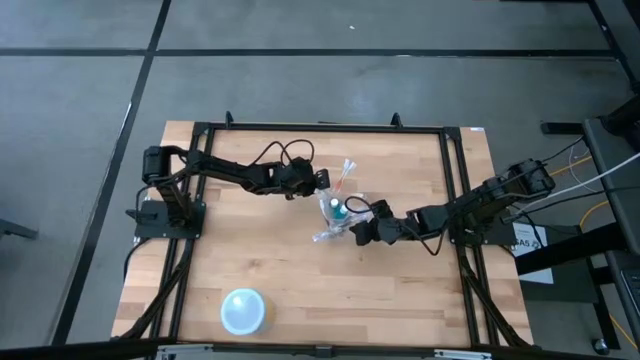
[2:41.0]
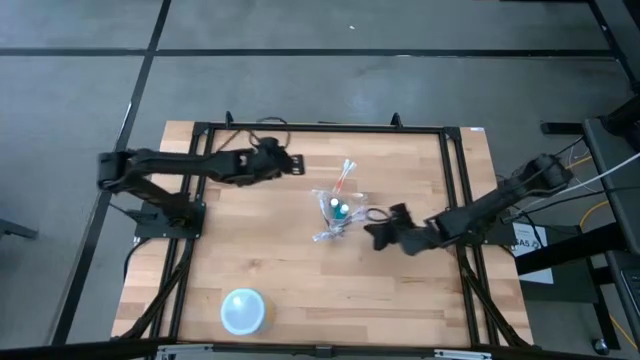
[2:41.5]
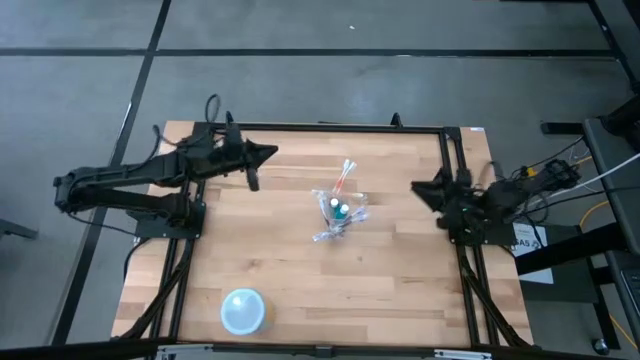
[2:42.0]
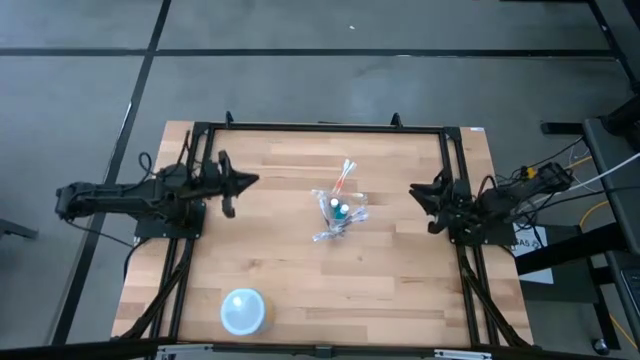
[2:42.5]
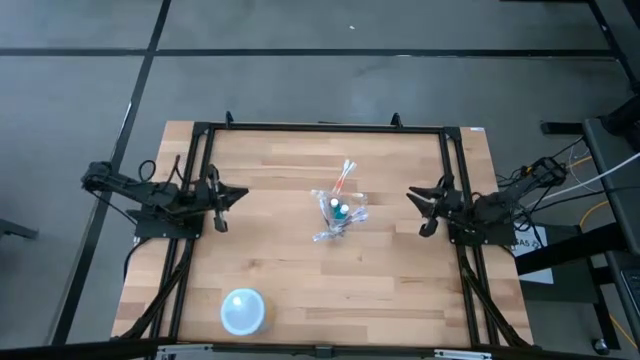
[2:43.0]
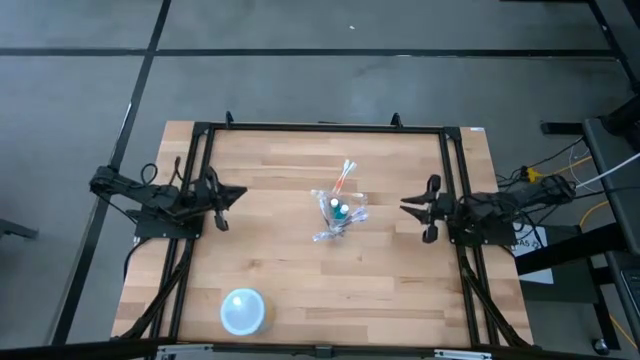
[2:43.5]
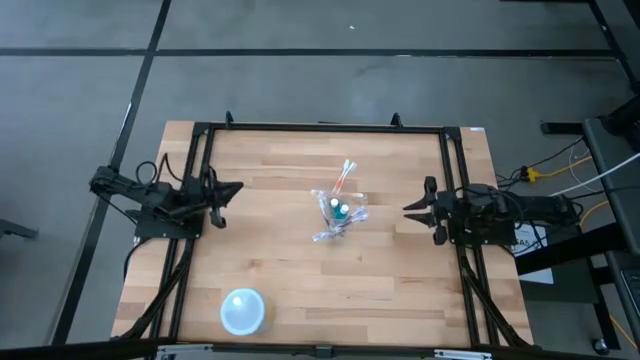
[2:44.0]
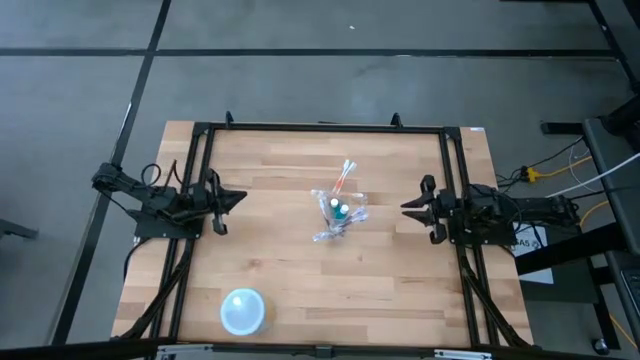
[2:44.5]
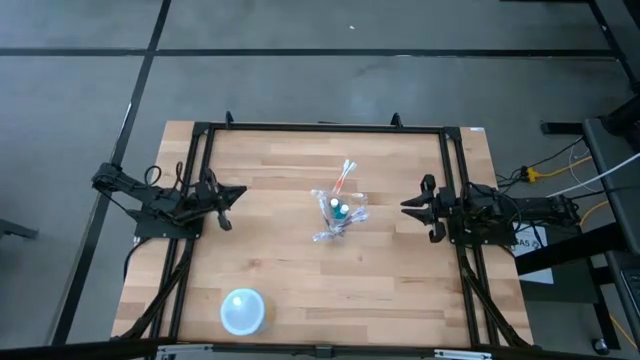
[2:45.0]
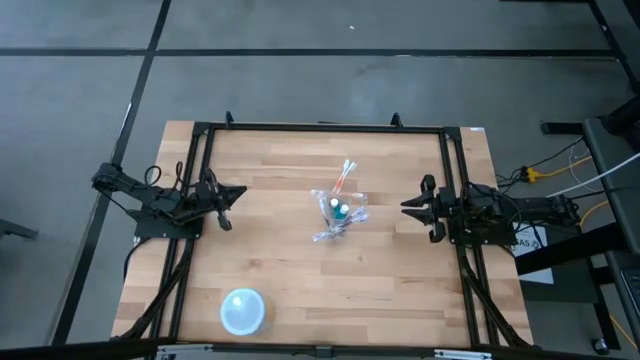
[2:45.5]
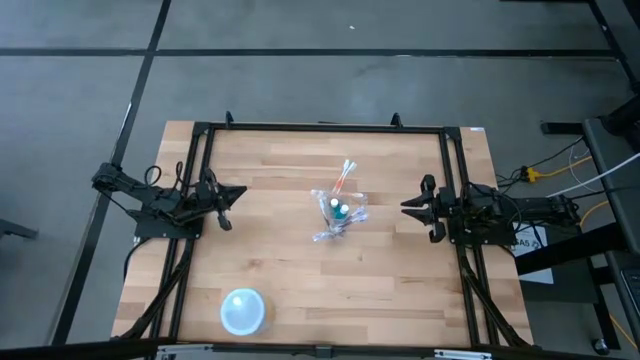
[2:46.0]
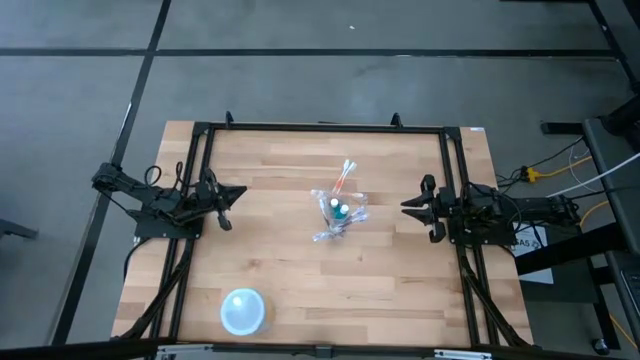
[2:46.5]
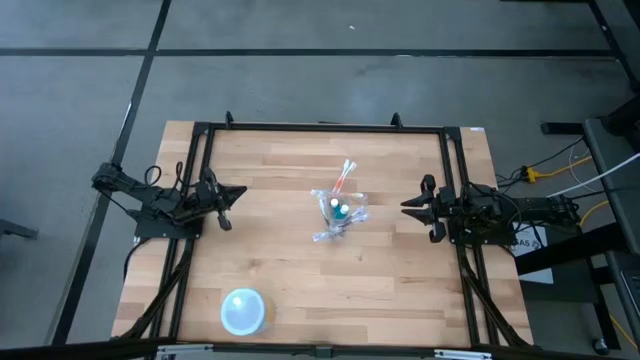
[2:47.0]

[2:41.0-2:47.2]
Task: Pick & Place toothbrushing station
Return to Home Position

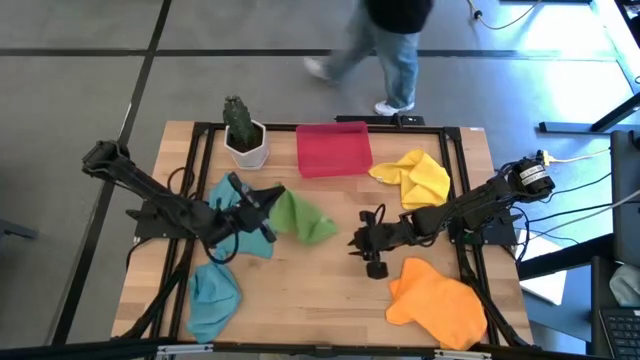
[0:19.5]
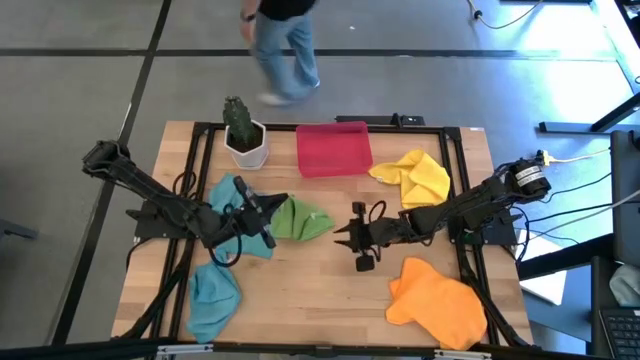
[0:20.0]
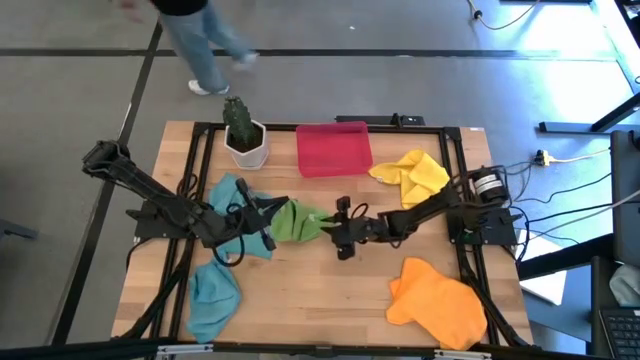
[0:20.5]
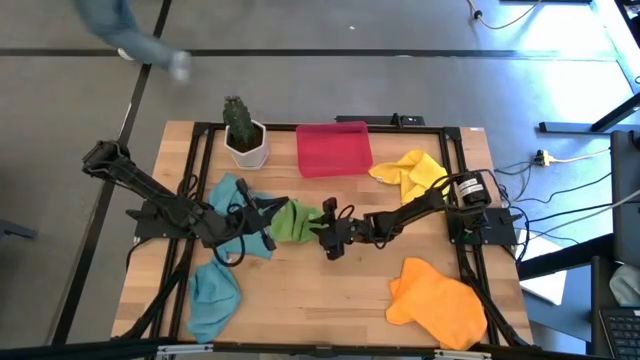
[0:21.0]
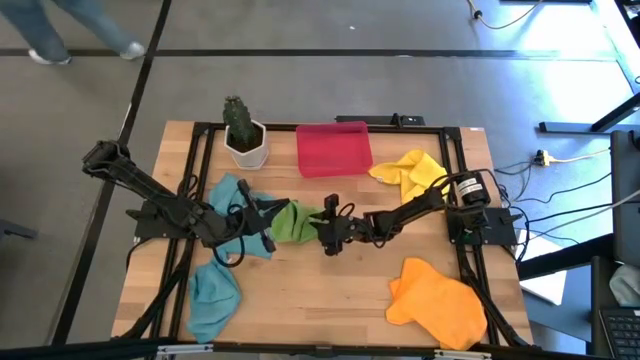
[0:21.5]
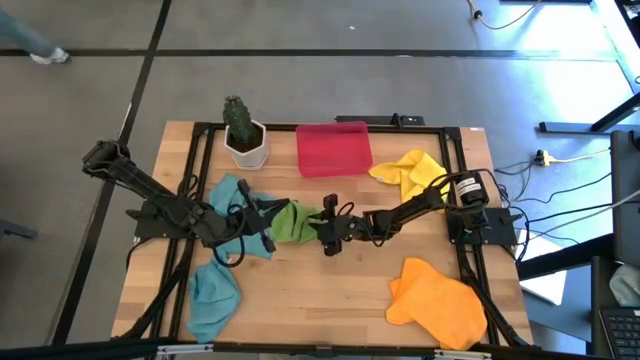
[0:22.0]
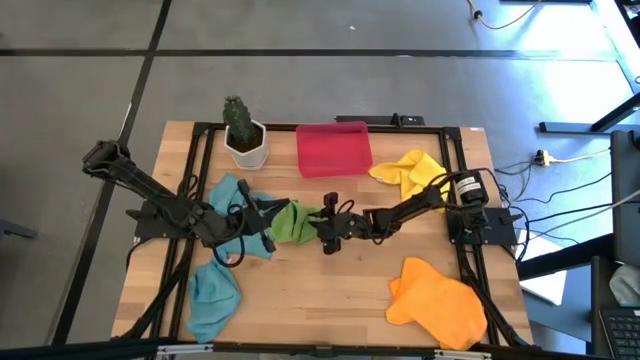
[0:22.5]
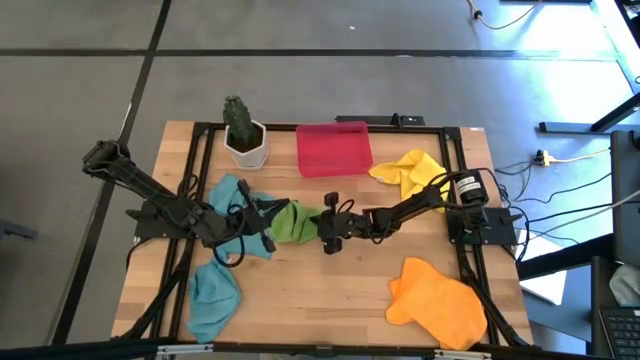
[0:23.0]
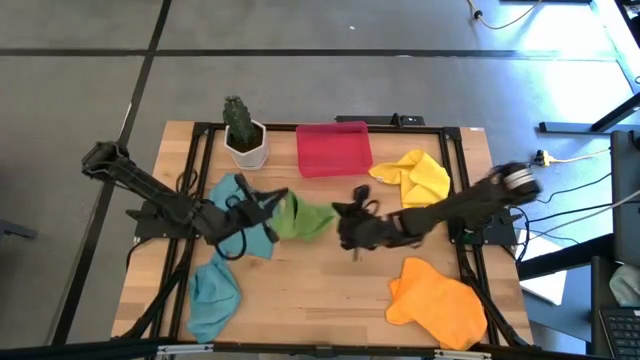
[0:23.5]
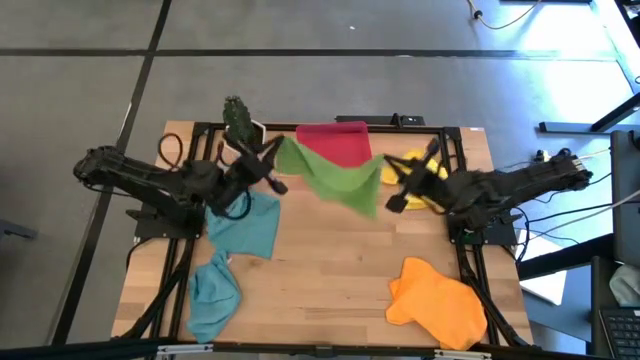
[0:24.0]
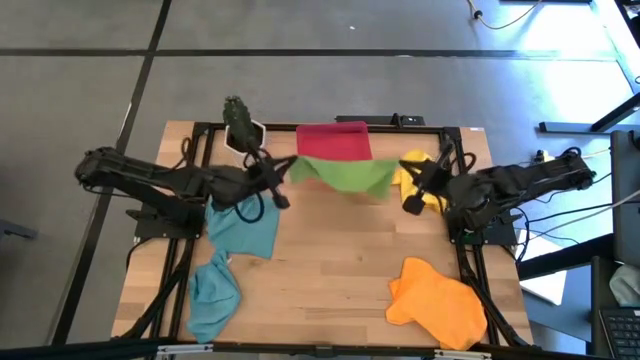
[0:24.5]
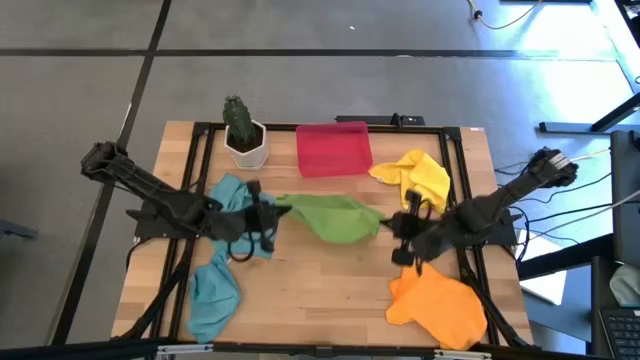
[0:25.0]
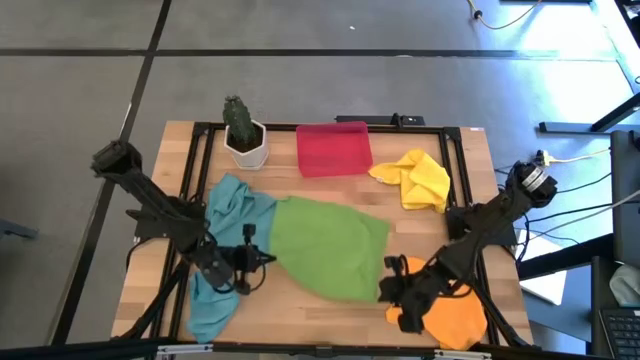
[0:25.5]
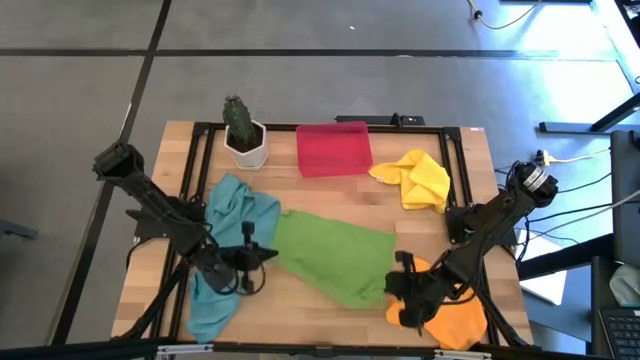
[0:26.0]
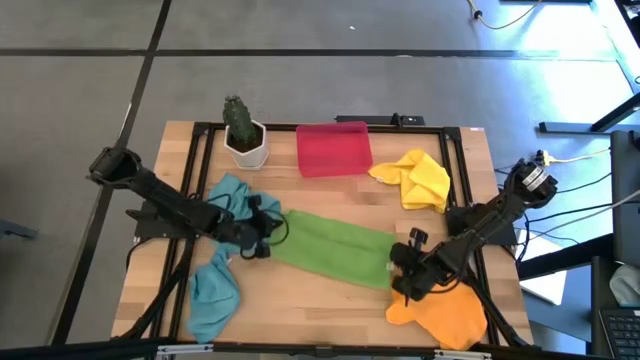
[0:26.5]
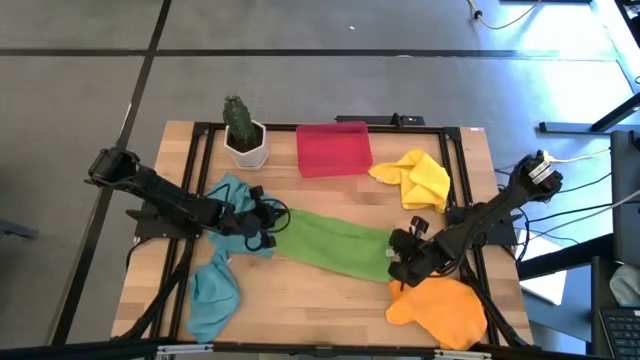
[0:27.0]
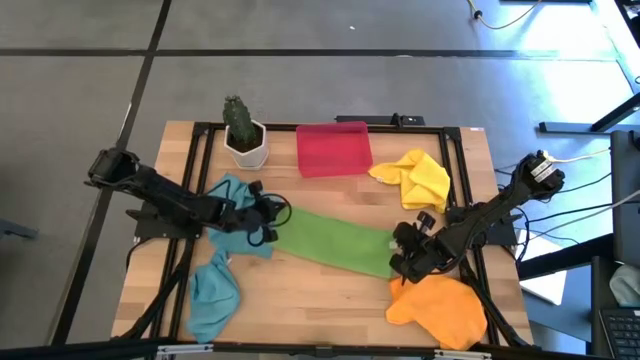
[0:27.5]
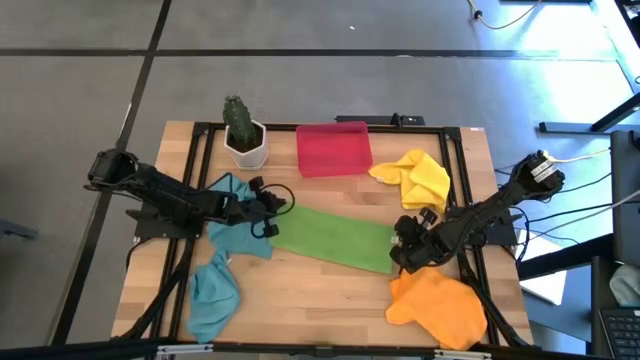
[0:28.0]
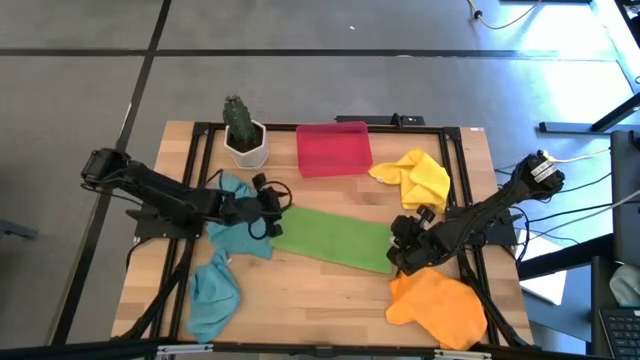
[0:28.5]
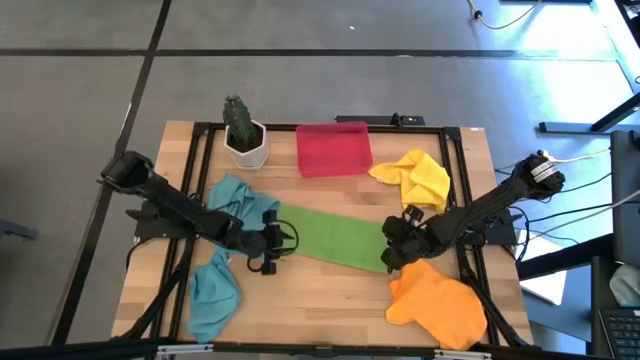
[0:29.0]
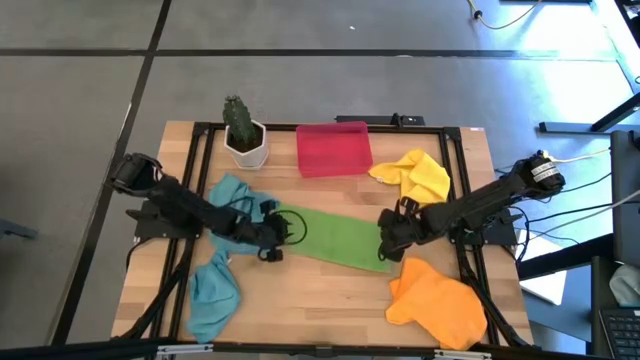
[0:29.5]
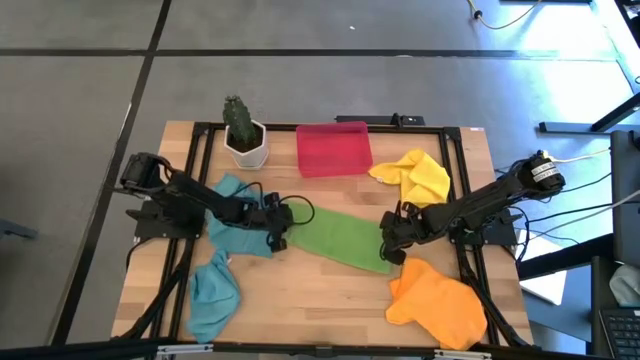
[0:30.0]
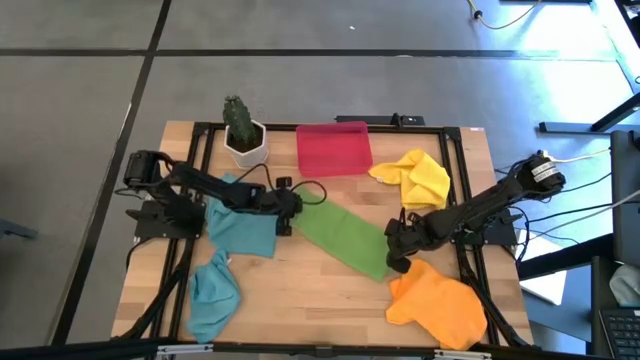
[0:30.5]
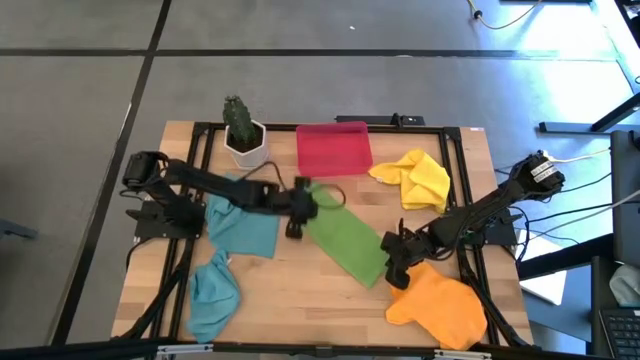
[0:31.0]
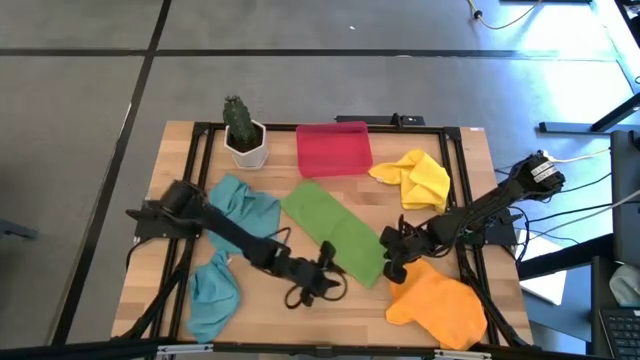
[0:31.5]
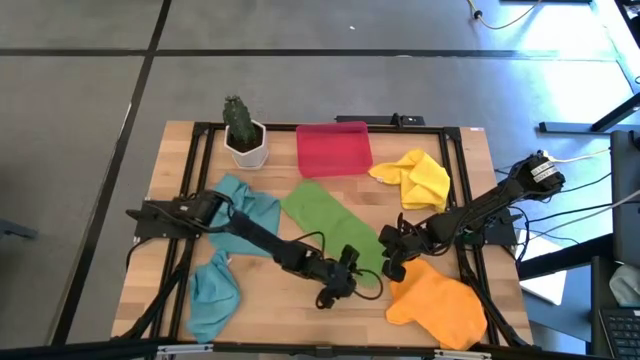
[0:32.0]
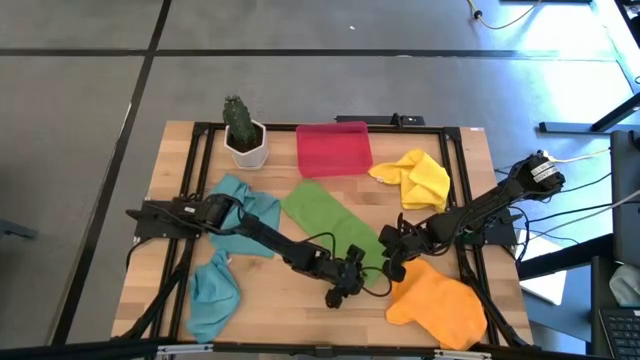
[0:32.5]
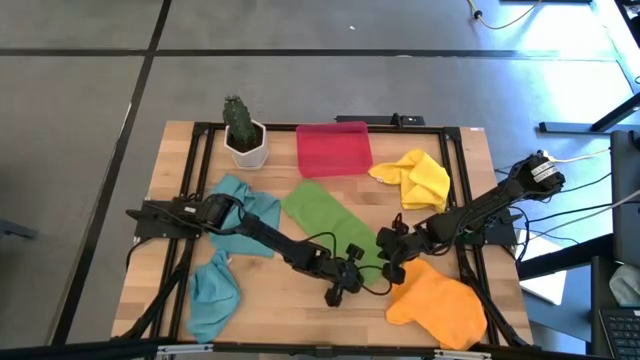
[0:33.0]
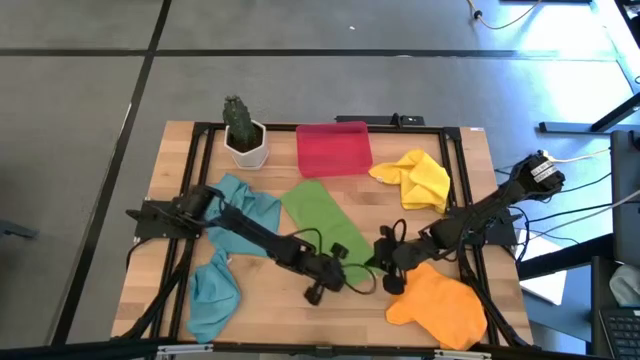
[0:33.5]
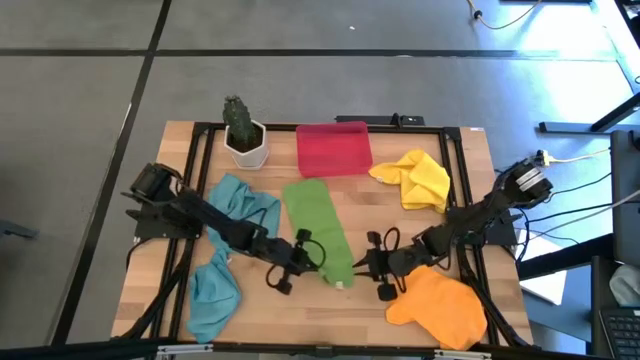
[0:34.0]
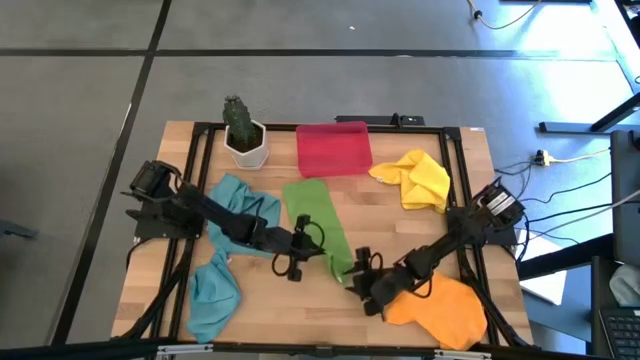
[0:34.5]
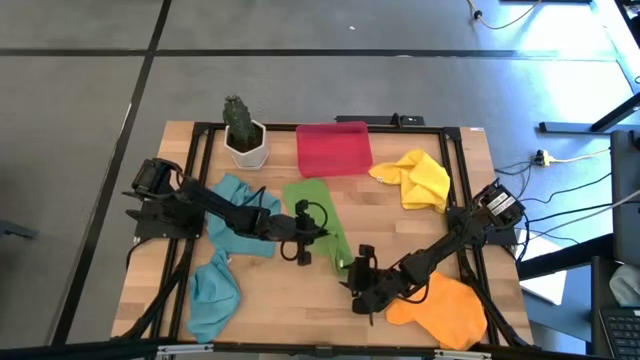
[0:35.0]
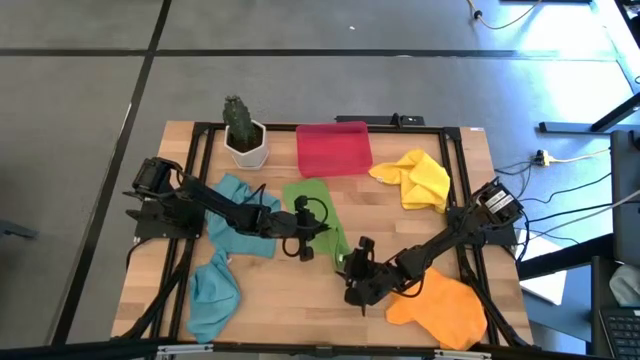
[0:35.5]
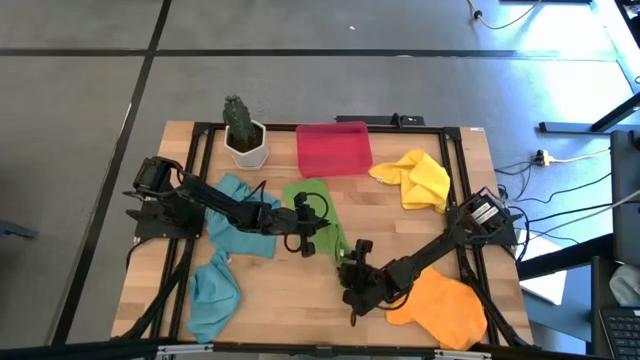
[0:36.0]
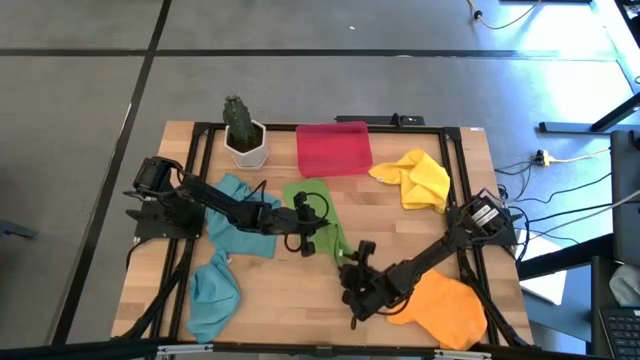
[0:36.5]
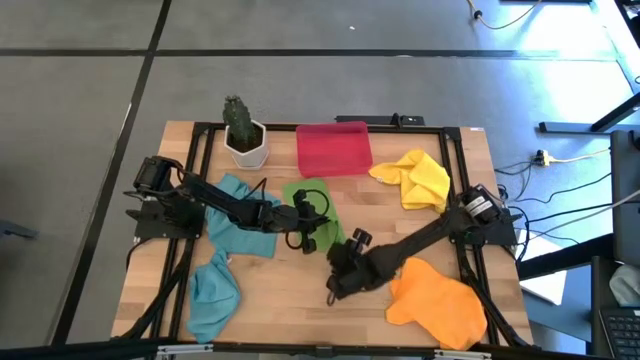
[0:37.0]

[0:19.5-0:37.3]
Task: Fold microfiber towels
Fold the green microfiber cloth
